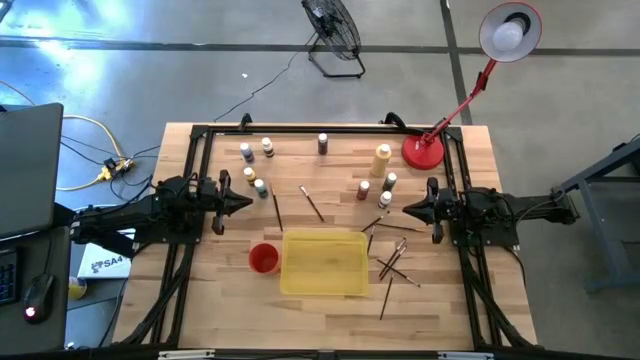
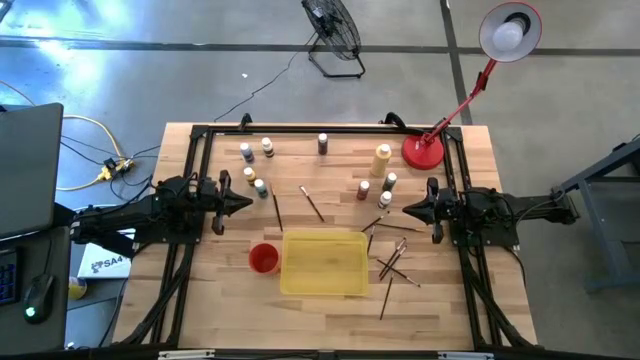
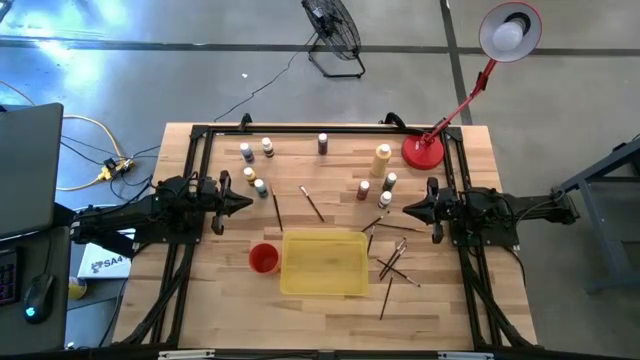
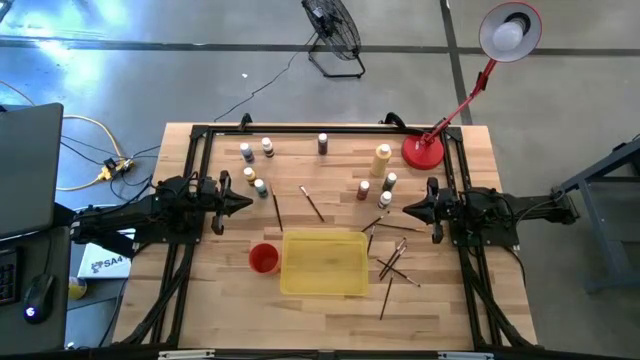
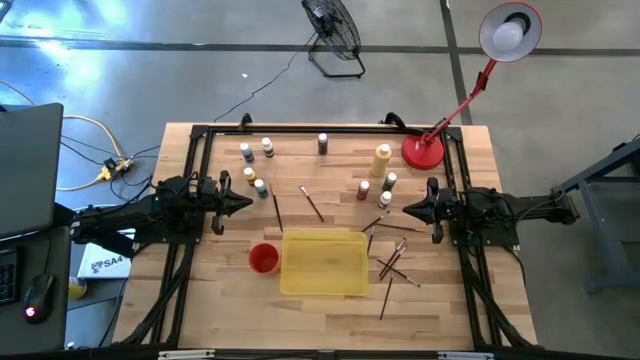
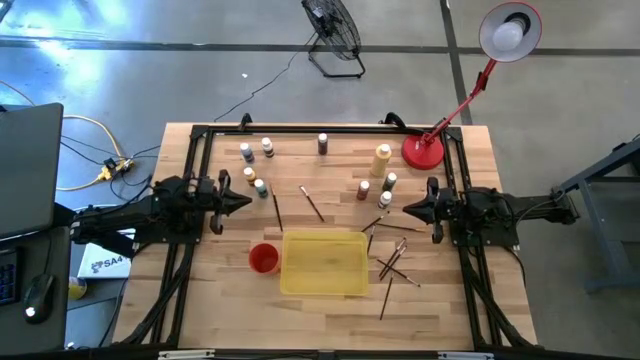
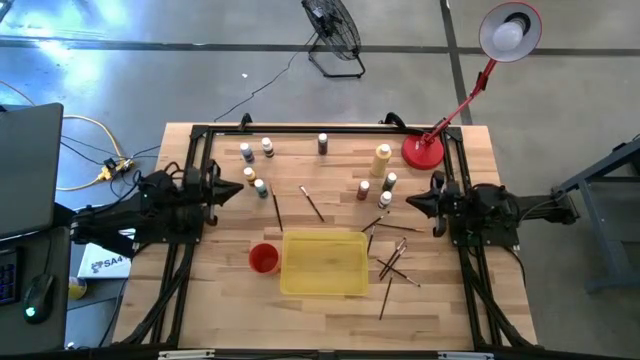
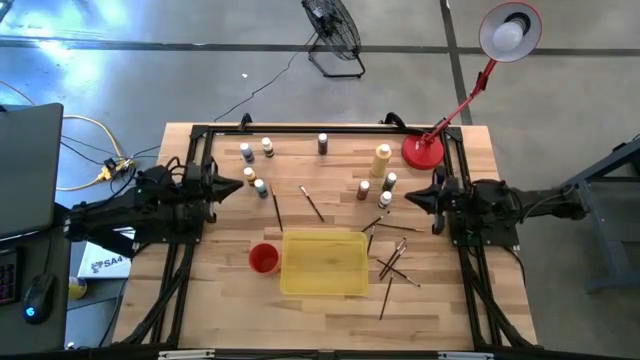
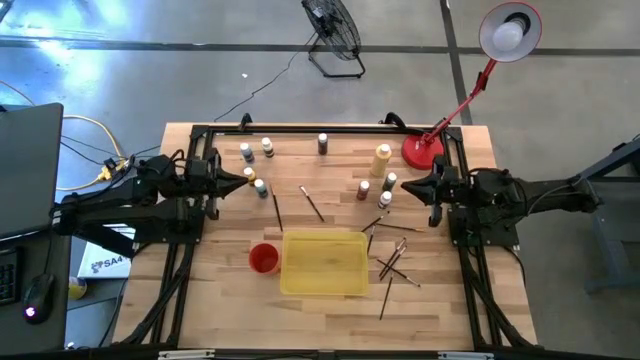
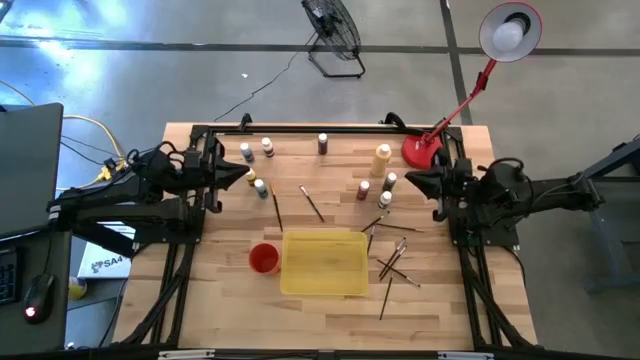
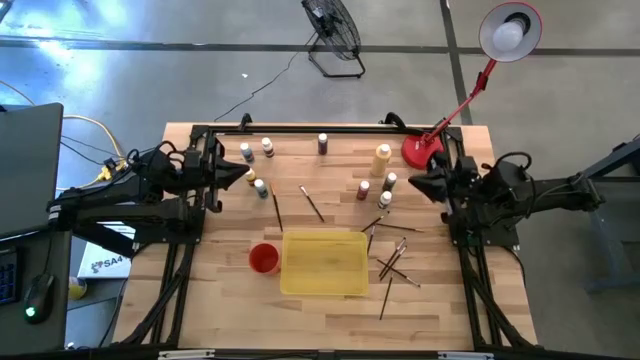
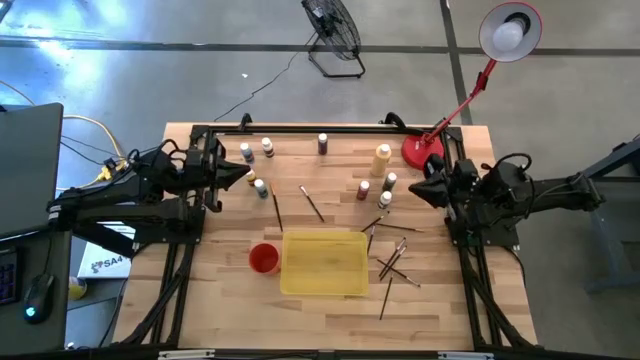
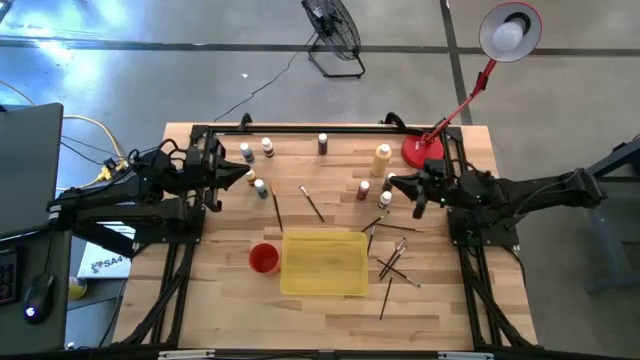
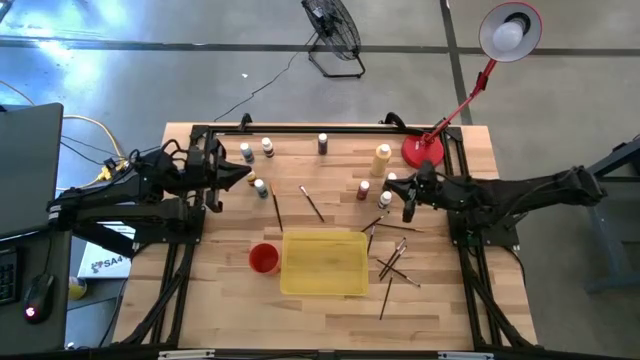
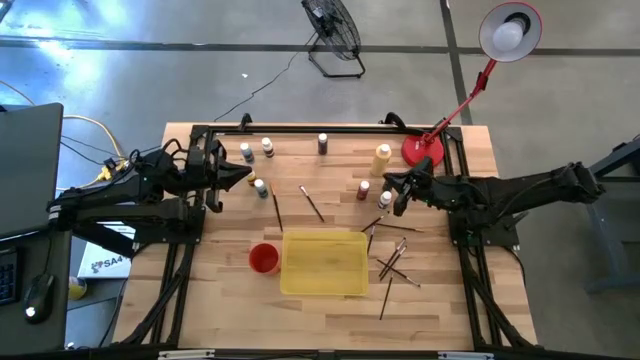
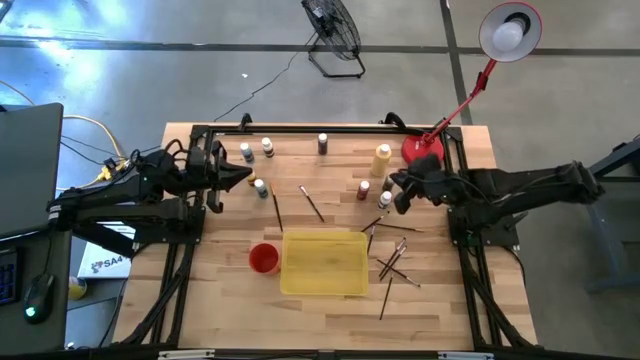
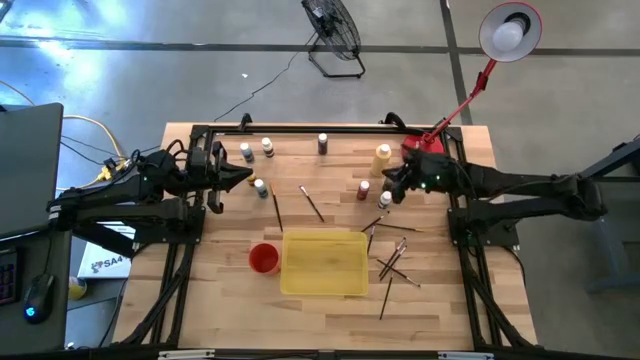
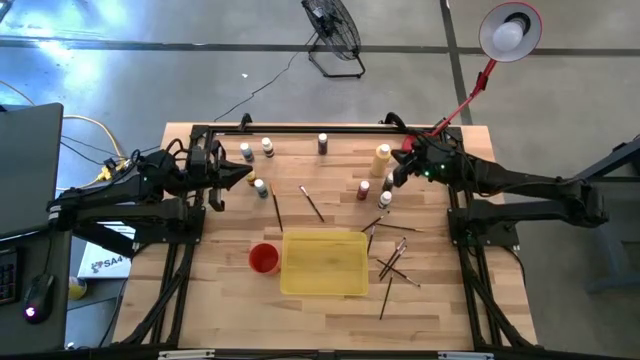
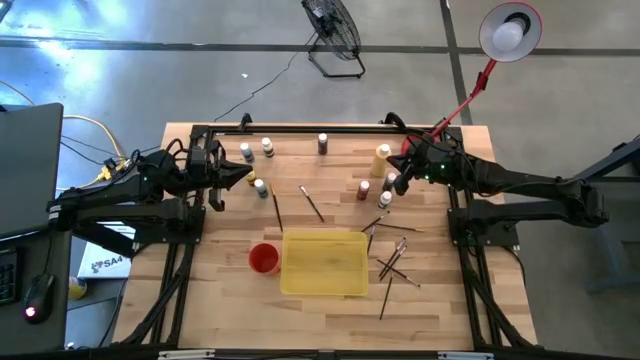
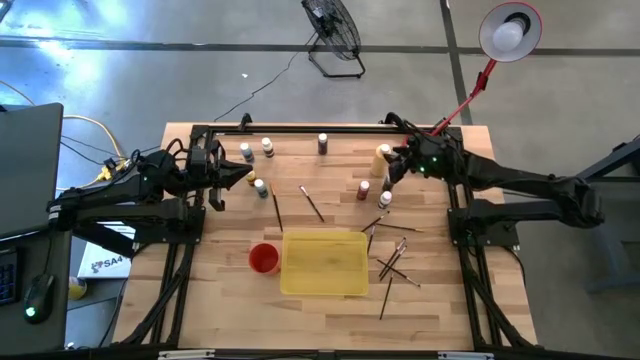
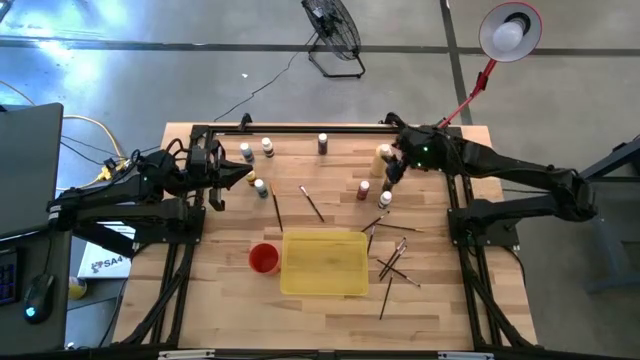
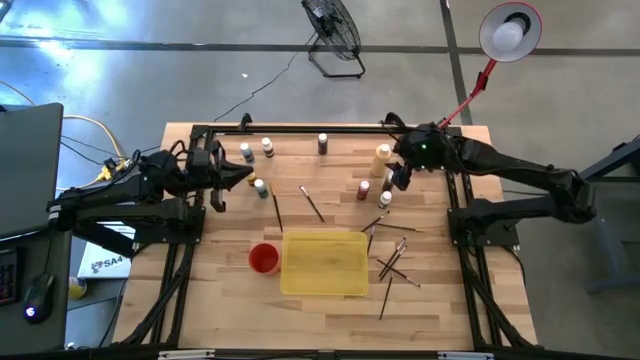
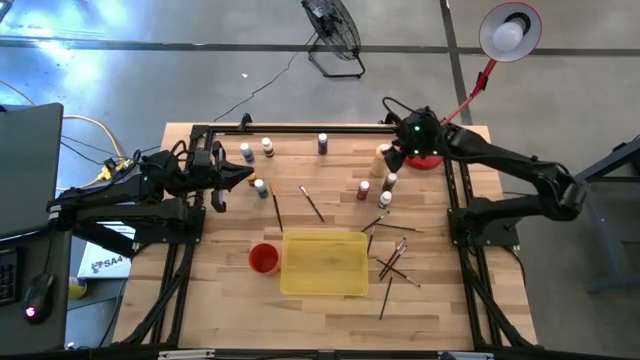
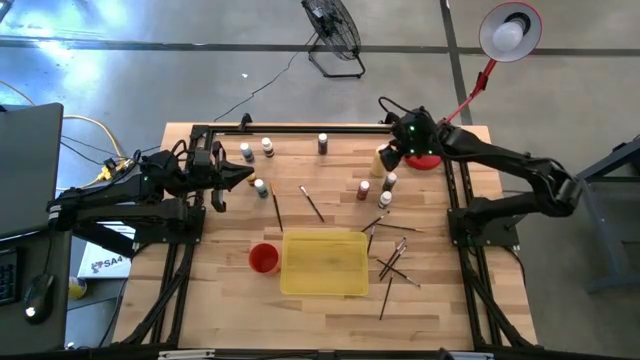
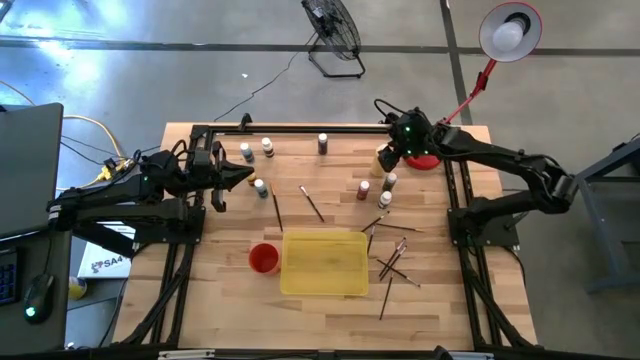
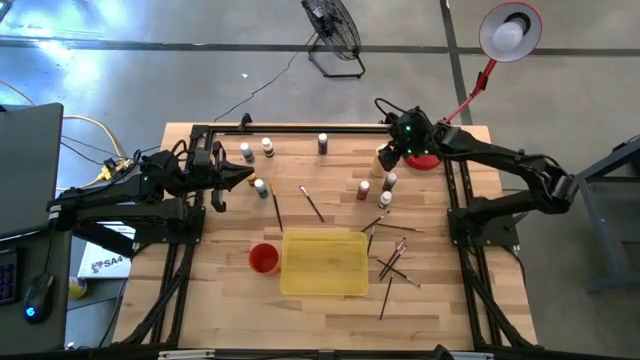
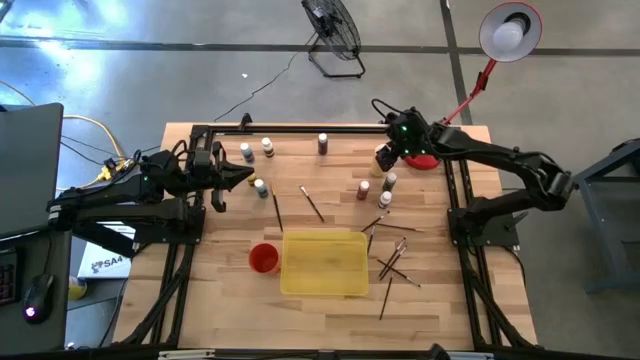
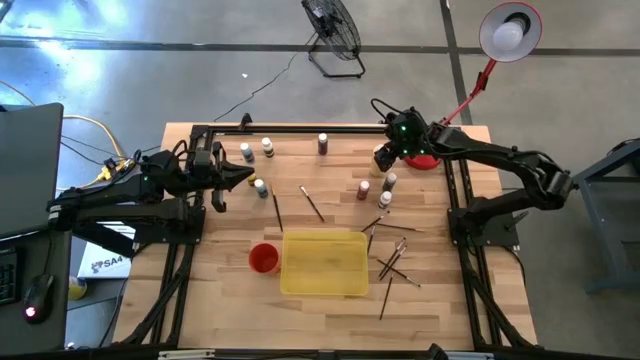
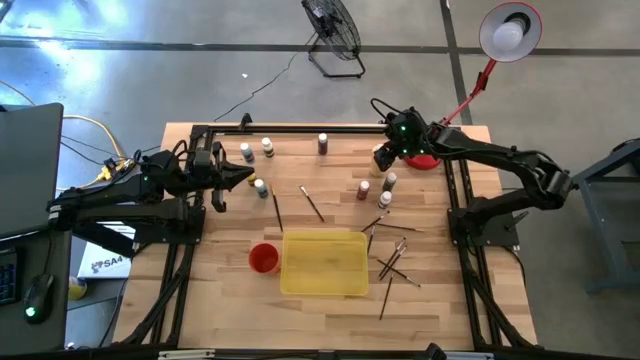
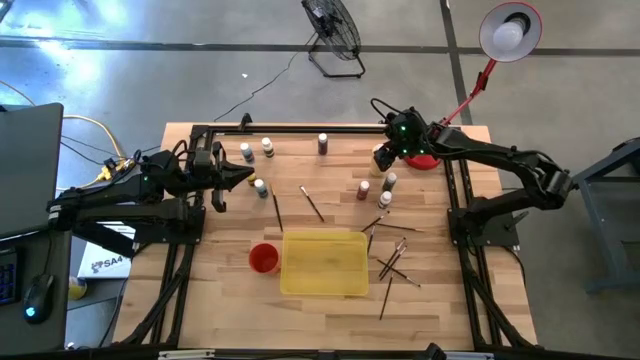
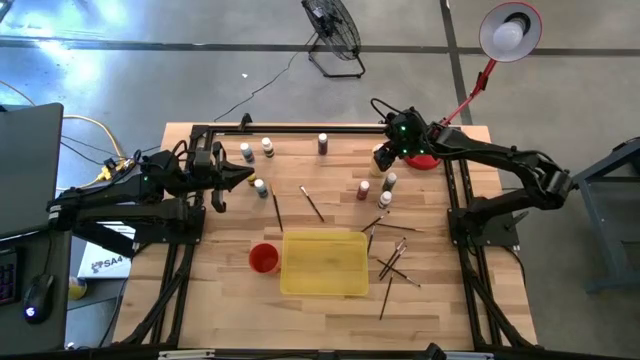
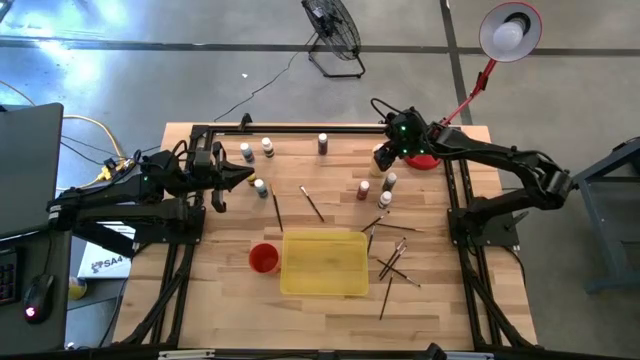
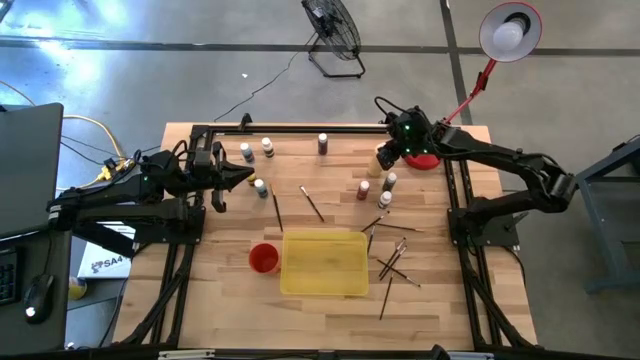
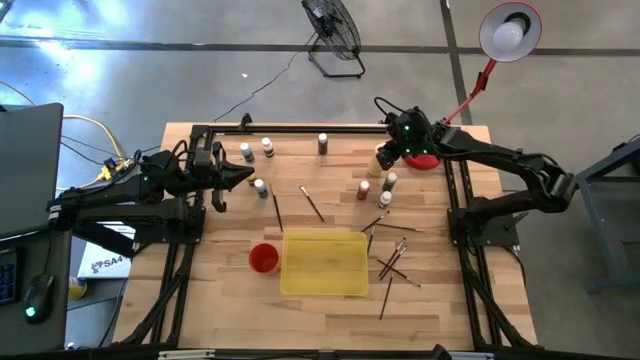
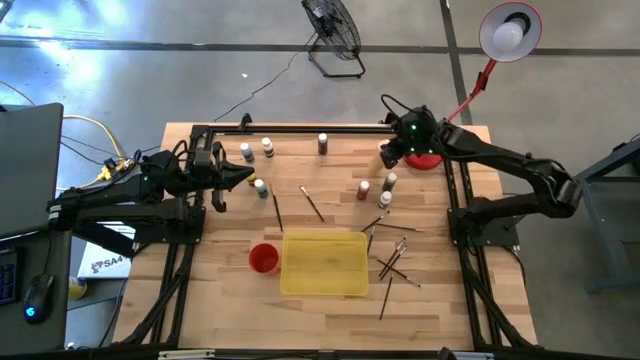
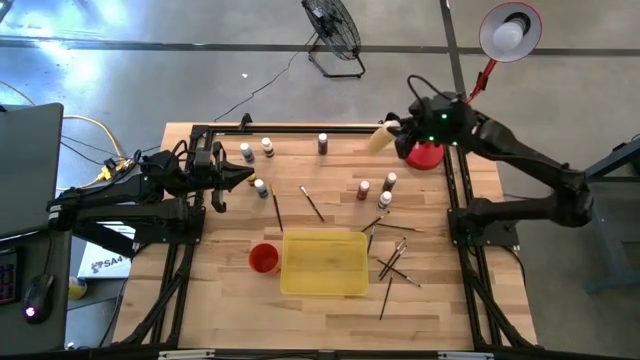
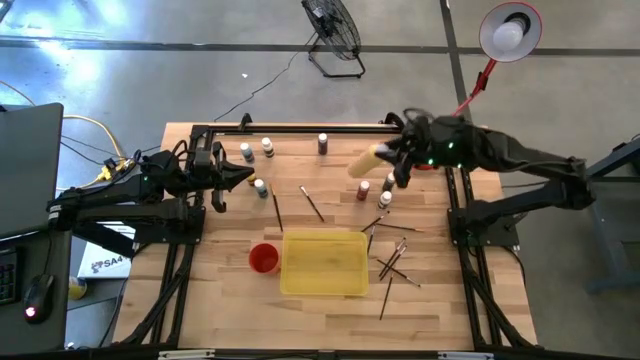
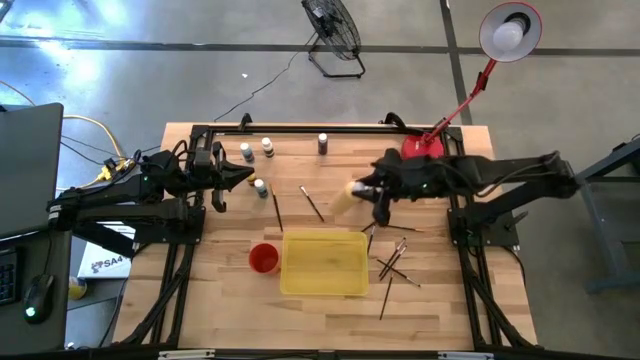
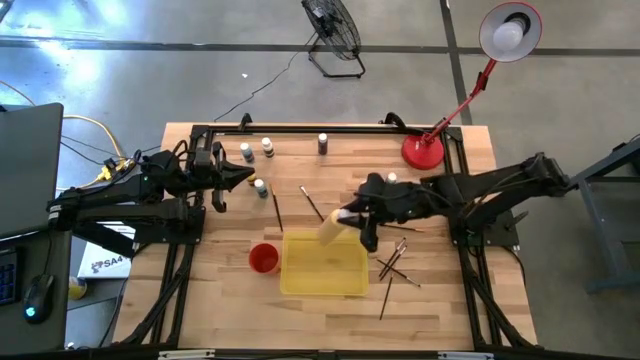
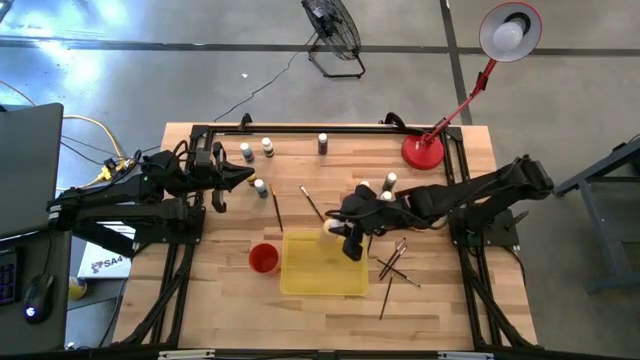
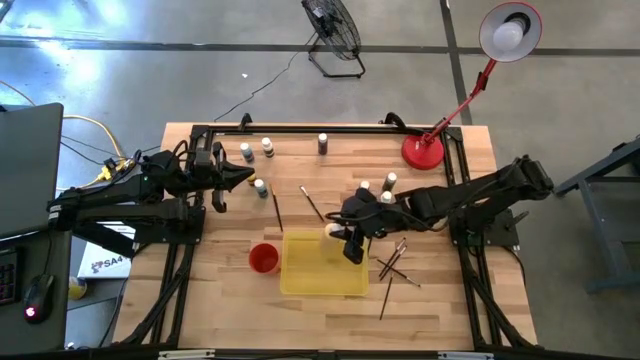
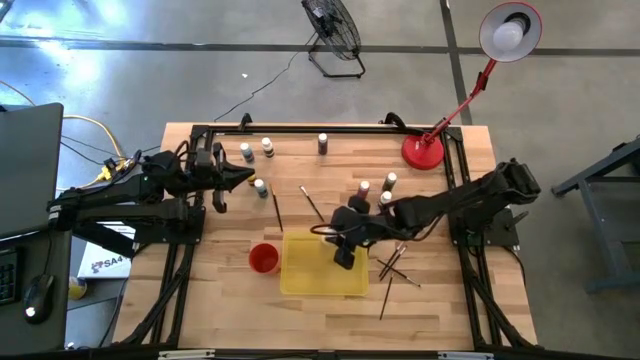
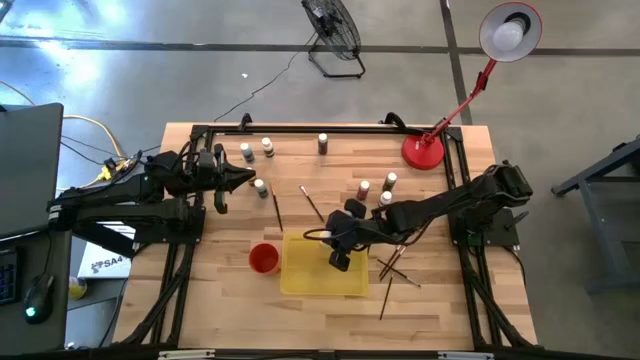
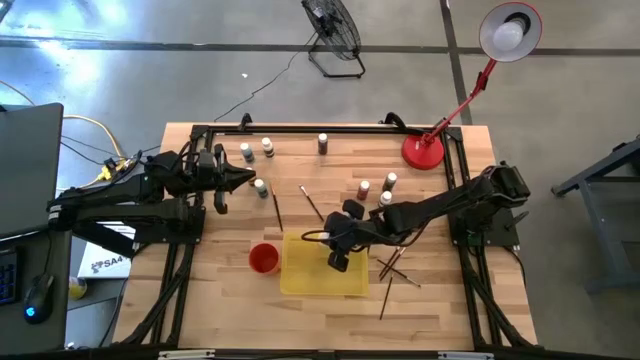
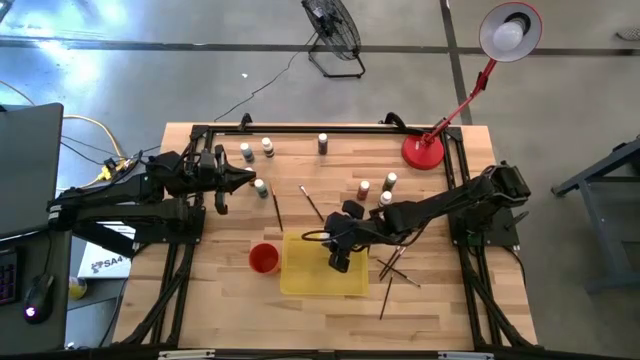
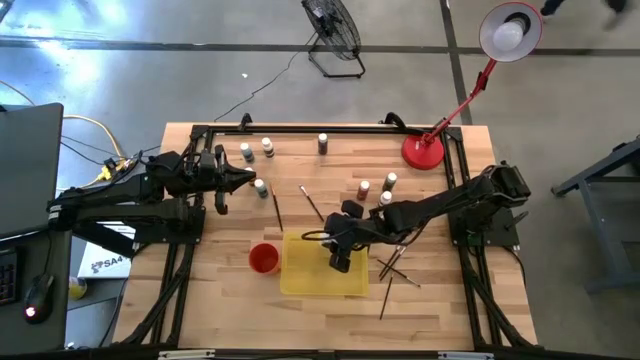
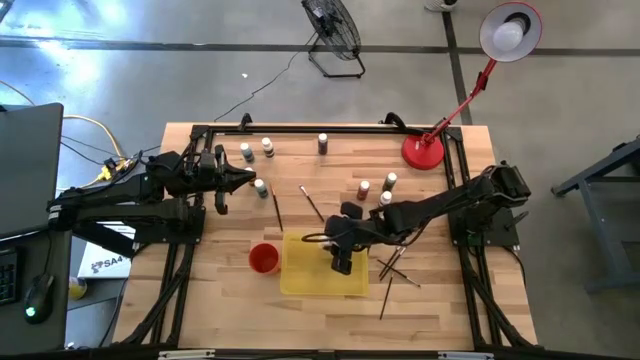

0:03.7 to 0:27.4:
Task: Pick & Place Paint Supplies
Put the yellow paint bottle into the yellow bin
